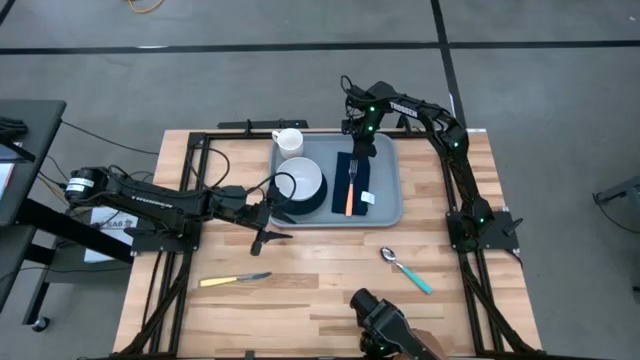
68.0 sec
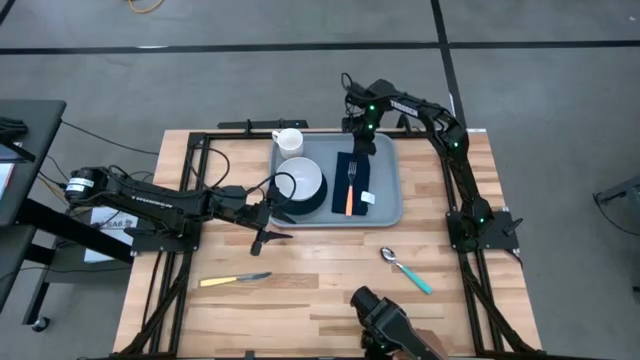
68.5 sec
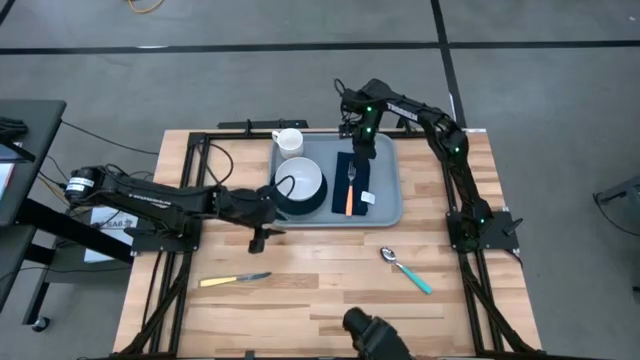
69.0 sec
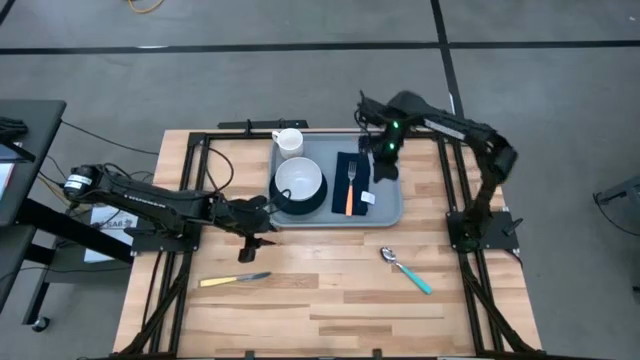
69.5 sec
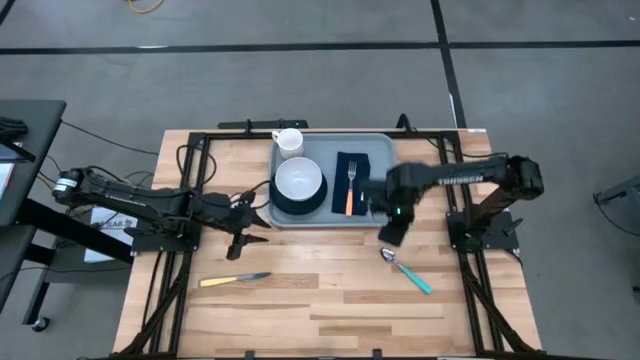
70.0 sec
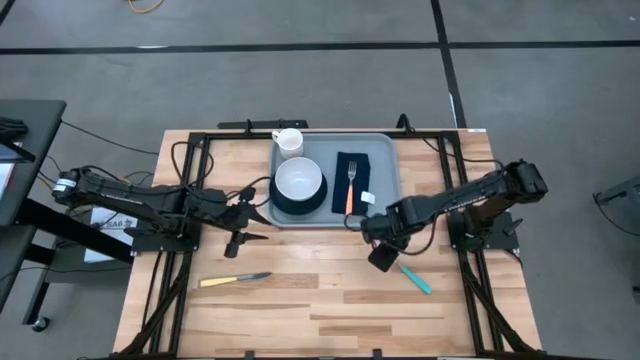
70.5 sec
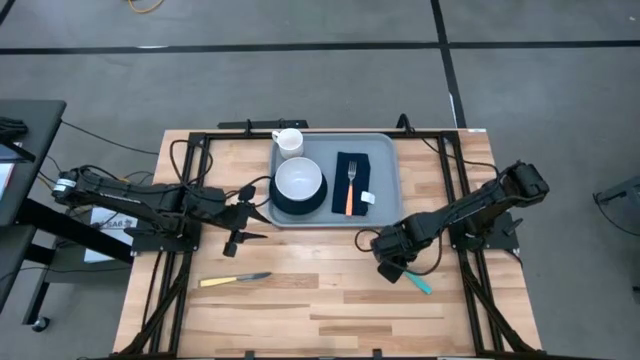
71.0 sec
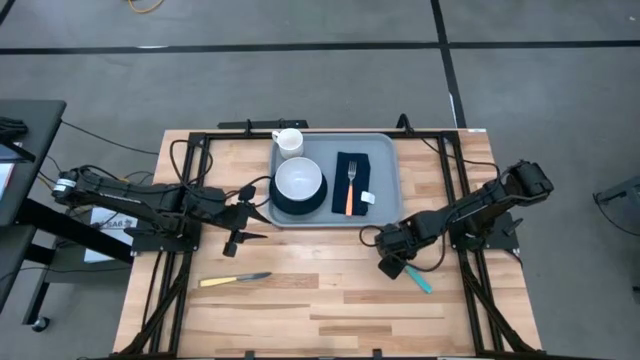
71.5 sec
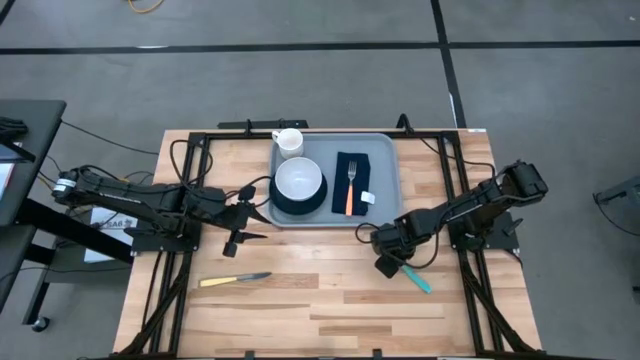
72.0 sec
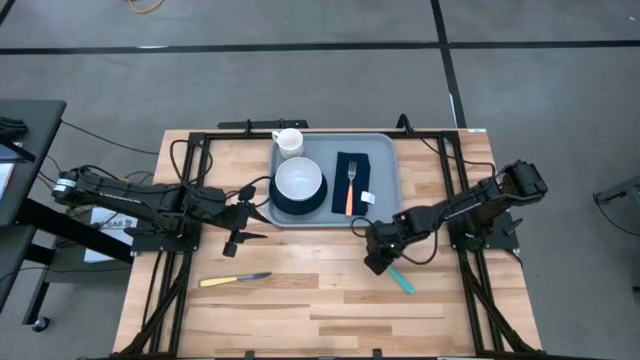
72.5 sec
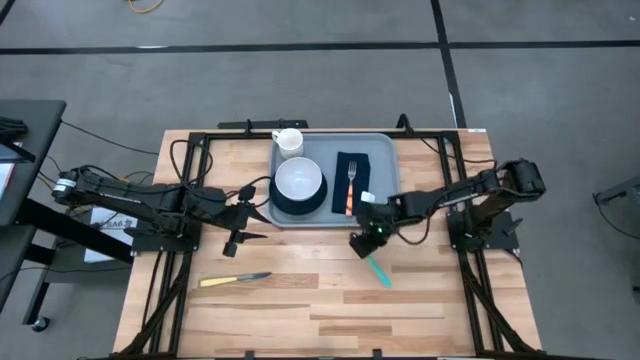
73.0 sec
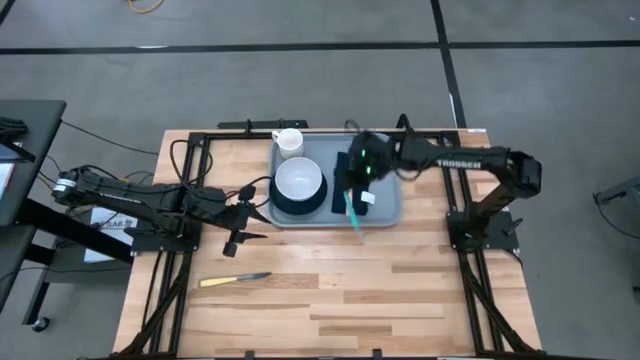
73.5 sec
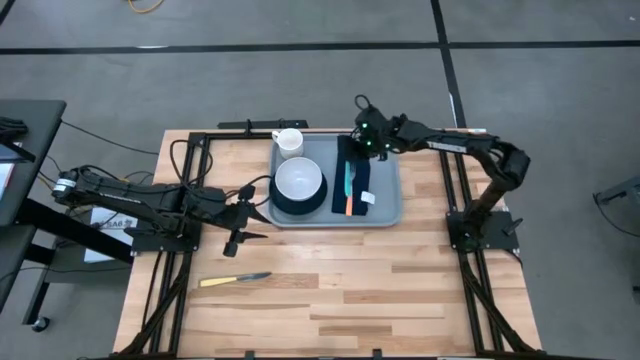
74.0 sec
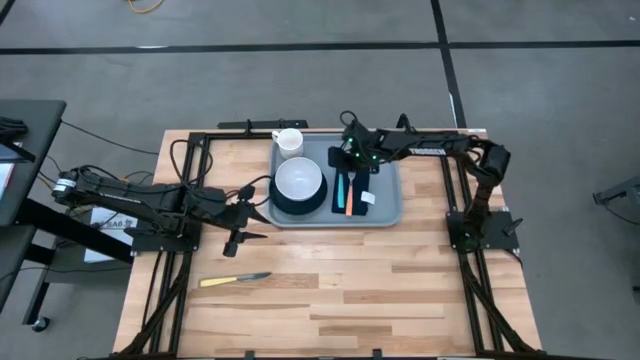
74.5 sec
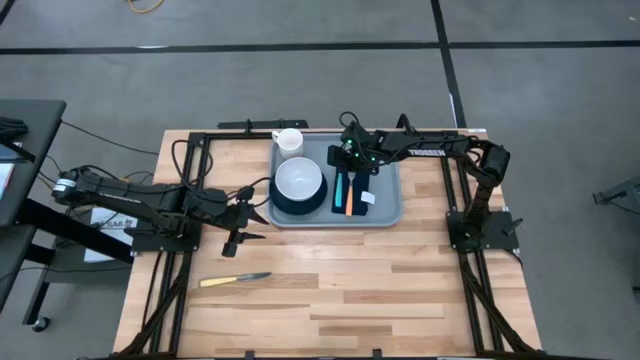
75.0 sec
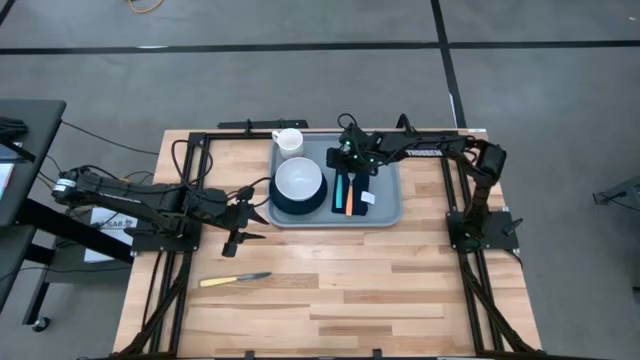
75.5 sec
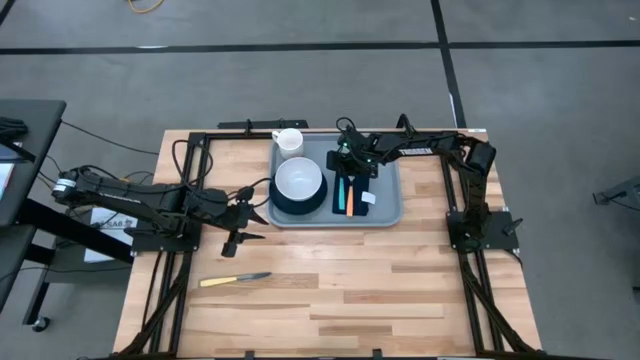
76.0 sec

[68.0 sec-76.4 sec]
Task: Set up tray
Put the spoon on top of the black table napkin on the gray serving tray

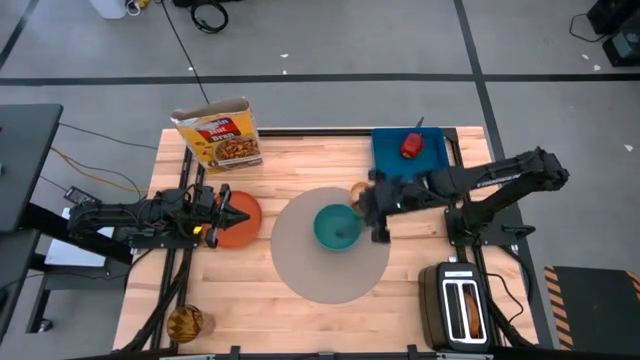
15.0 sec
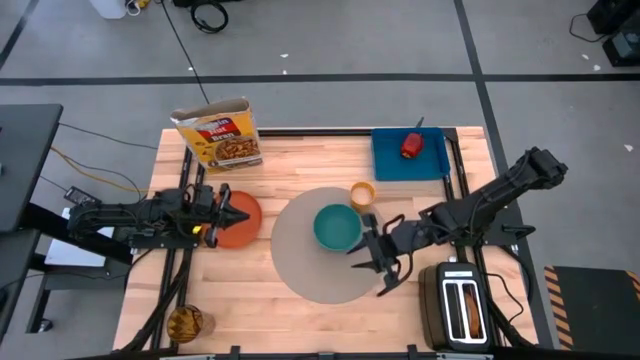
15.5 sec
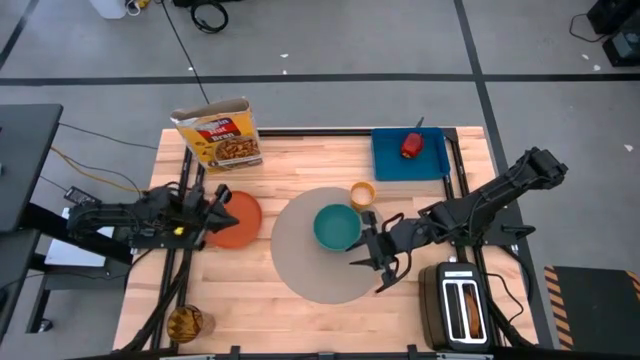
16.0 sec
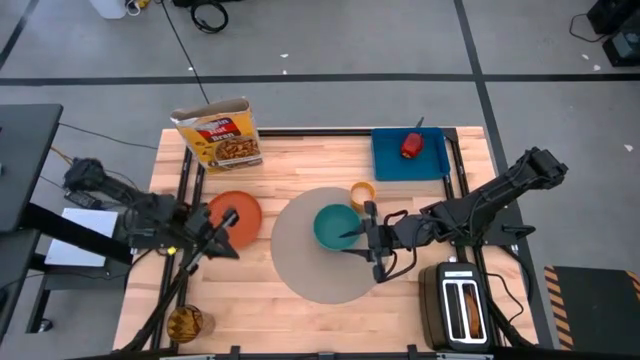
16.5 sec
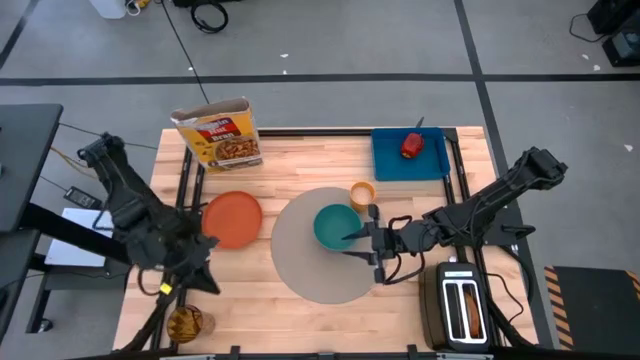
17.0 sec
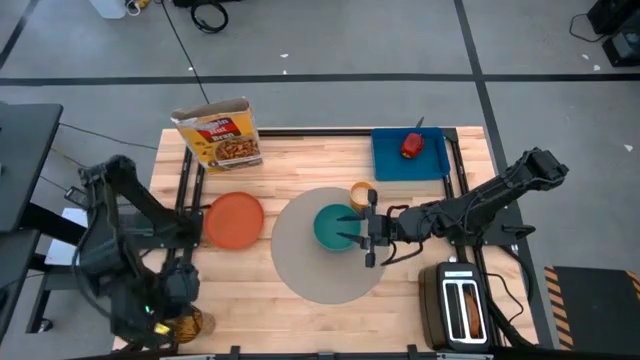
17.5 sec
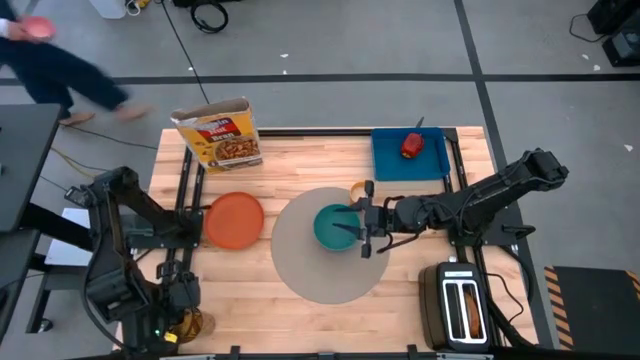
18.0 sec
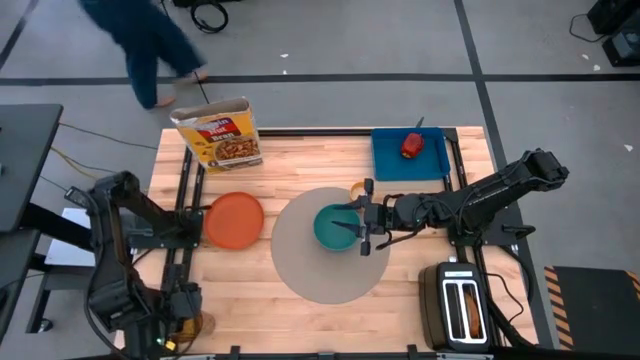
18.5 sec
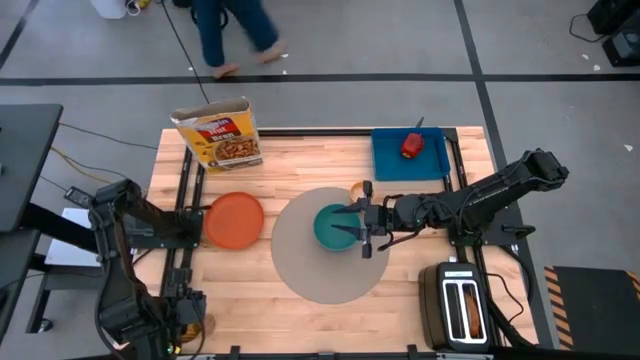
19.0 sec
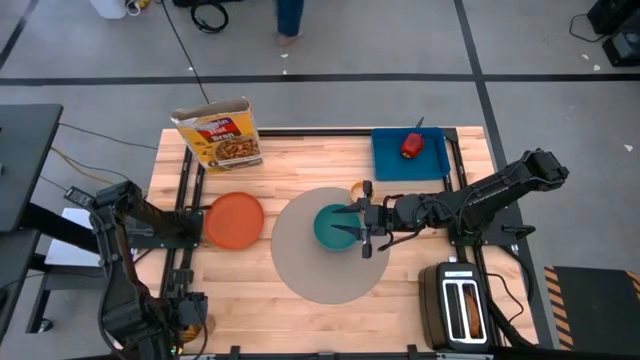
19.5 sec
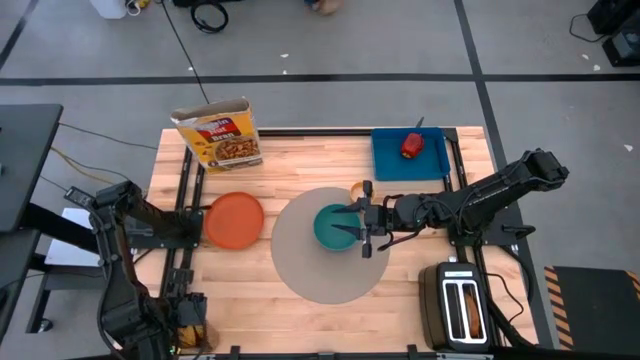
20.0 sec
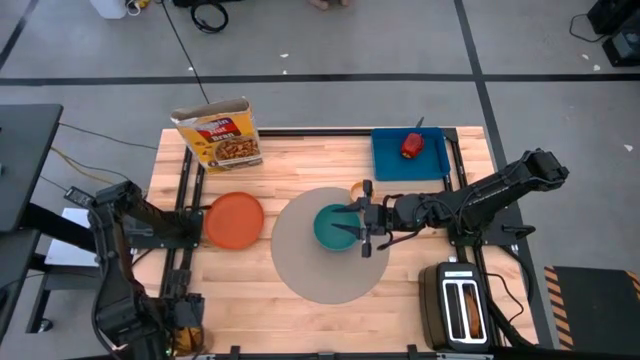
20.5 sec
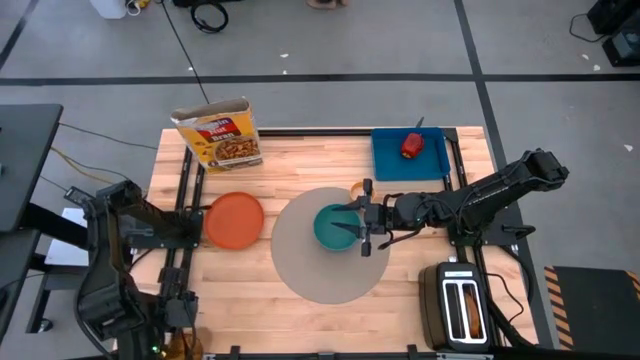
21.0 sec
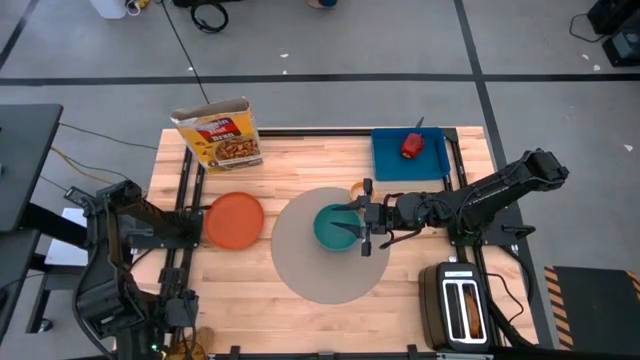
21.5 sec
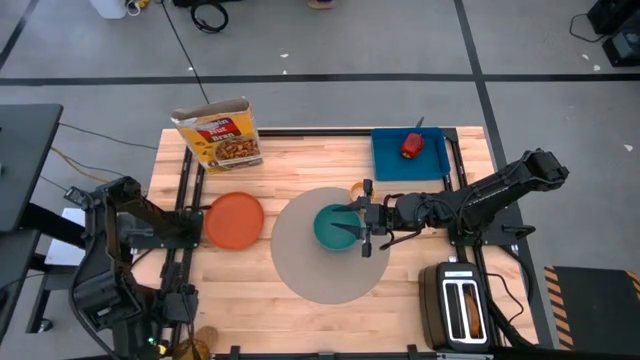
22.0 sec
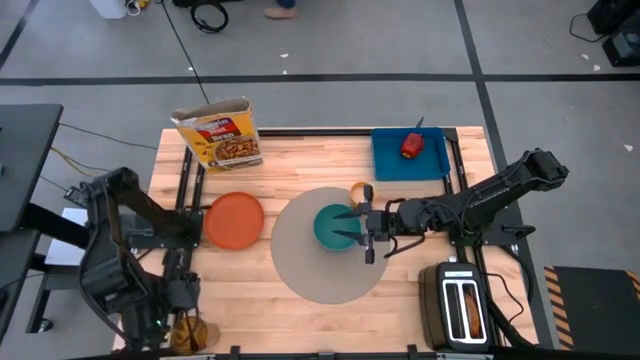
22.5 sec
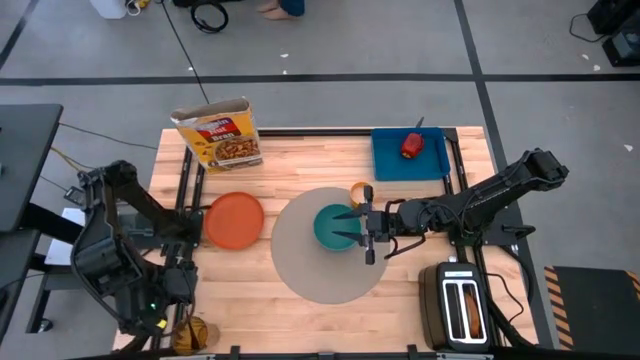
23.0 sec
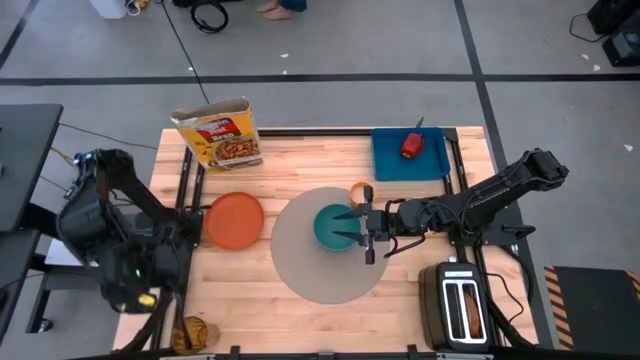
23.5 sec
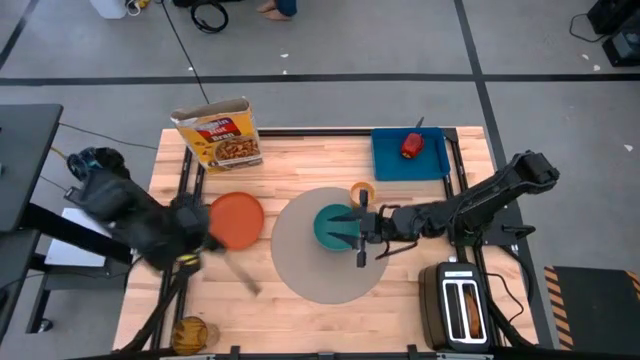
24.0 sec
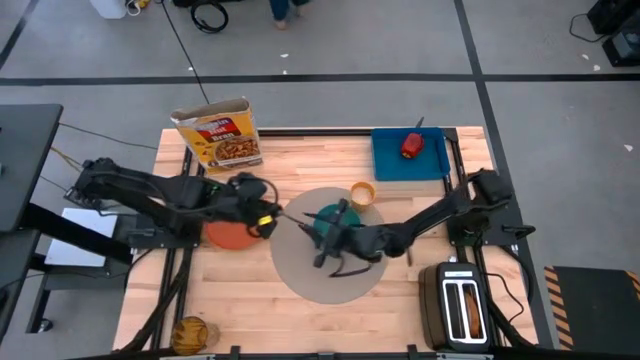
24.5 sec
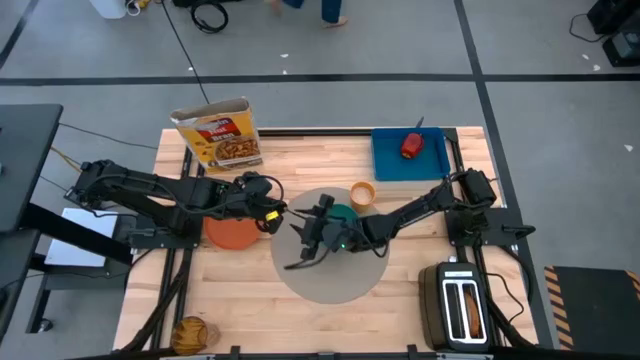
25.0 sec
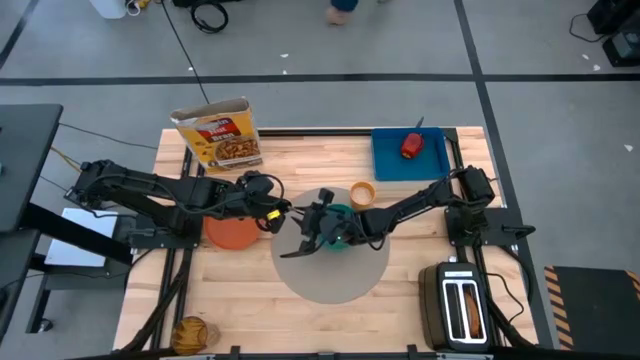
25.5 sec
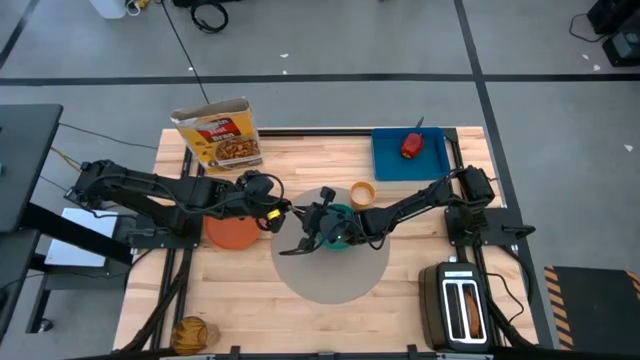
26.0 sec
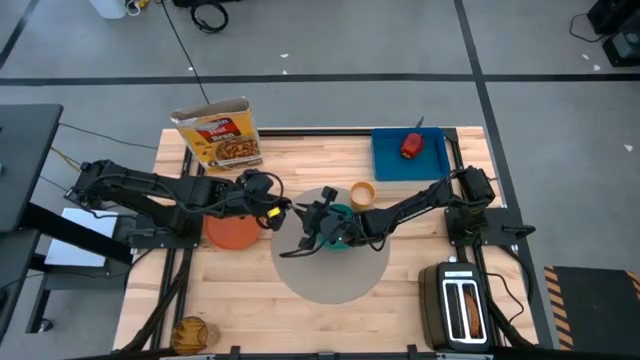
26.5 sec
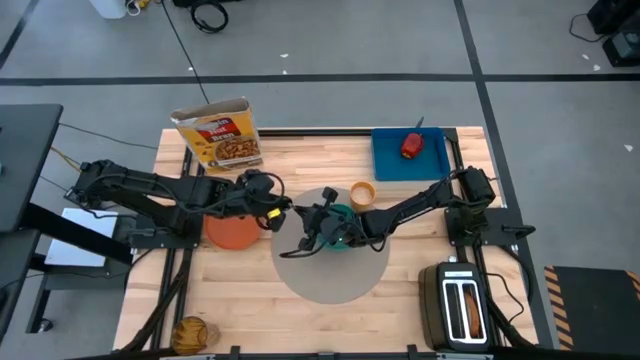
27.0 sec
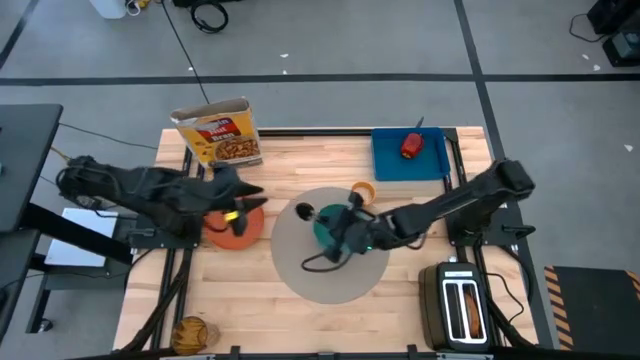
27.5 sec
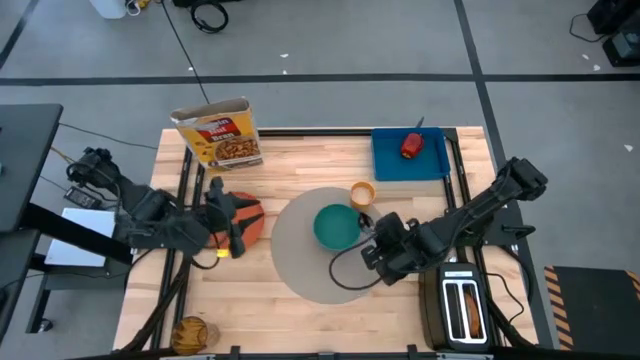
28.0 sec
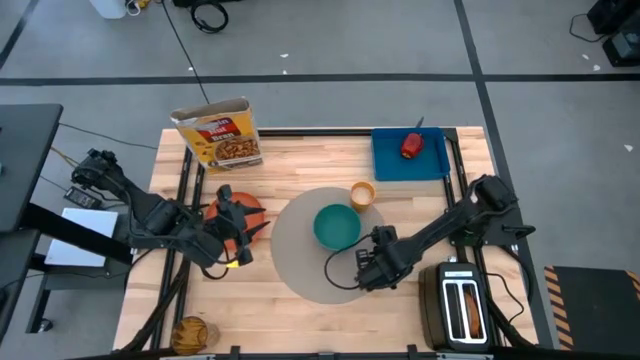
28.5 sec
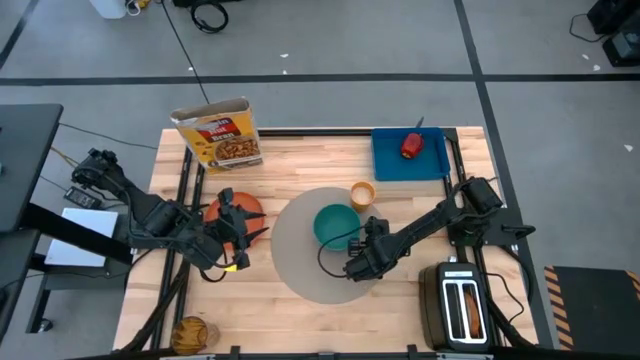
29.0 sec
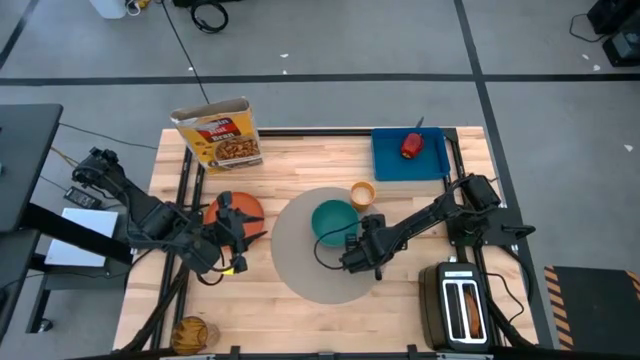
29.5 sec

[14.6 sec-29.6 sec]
Task: Arrange a breakfast setting
Put the spoon on the mat to the right of the bowl
